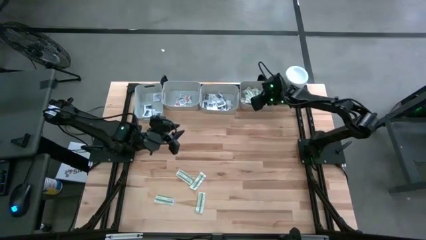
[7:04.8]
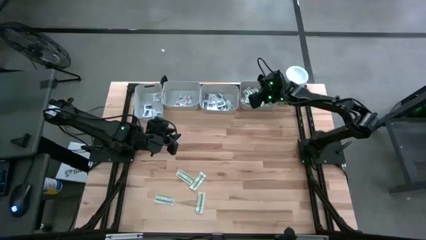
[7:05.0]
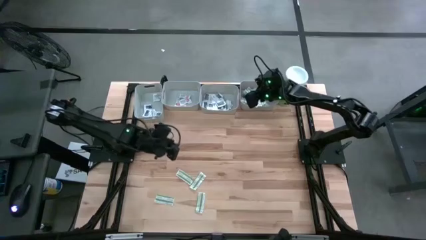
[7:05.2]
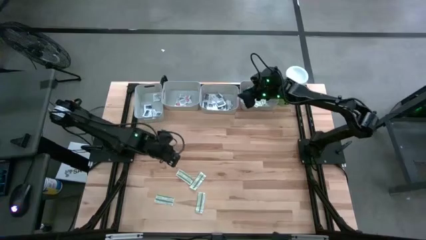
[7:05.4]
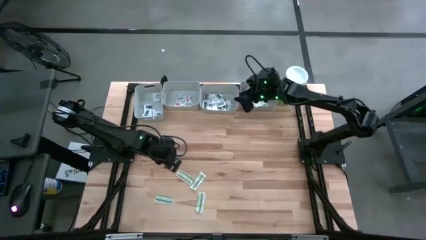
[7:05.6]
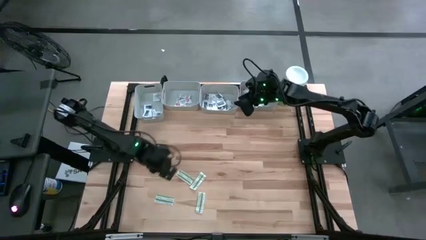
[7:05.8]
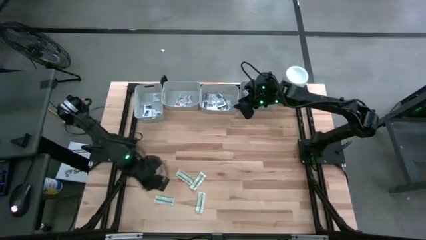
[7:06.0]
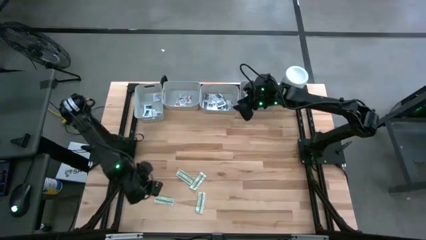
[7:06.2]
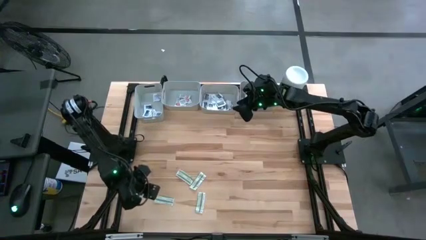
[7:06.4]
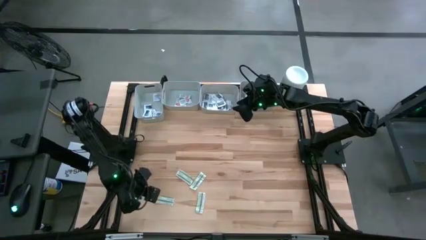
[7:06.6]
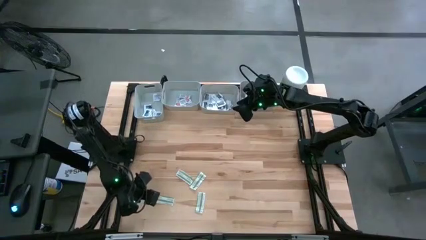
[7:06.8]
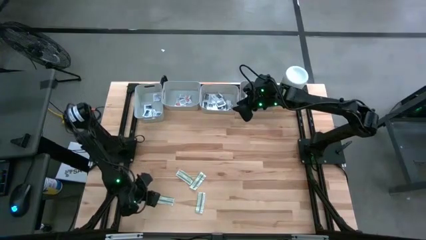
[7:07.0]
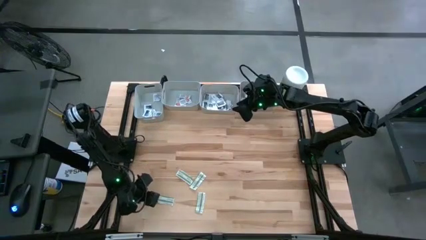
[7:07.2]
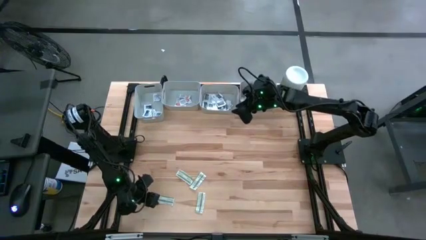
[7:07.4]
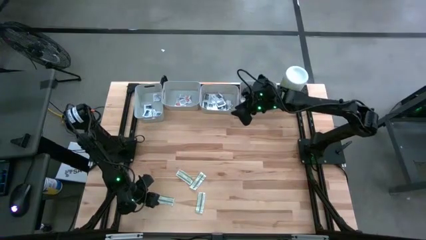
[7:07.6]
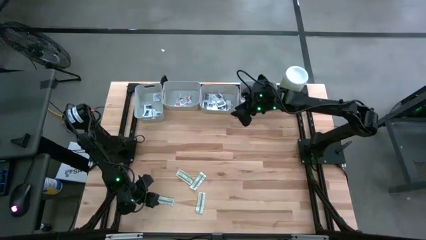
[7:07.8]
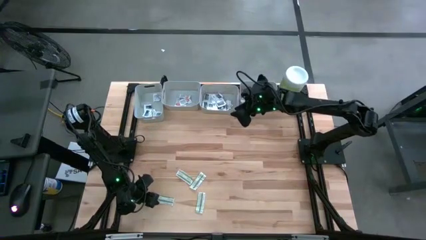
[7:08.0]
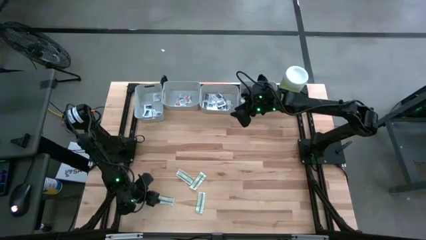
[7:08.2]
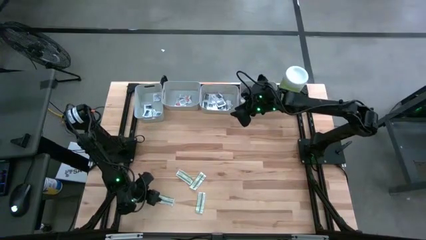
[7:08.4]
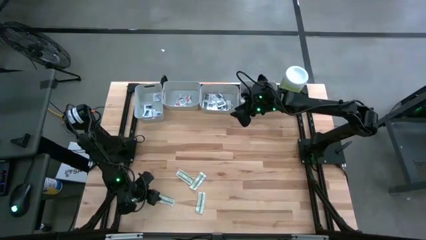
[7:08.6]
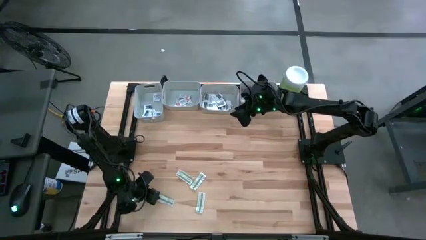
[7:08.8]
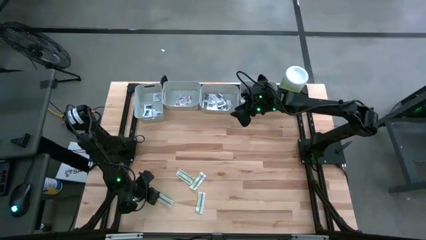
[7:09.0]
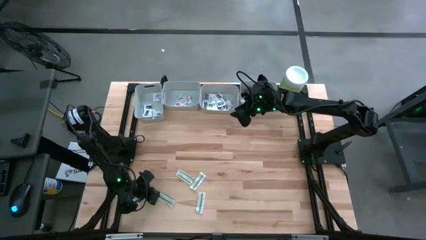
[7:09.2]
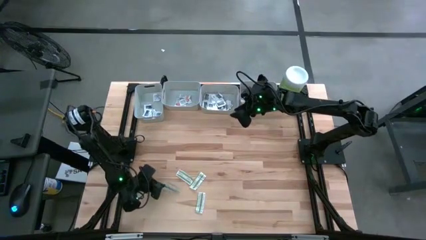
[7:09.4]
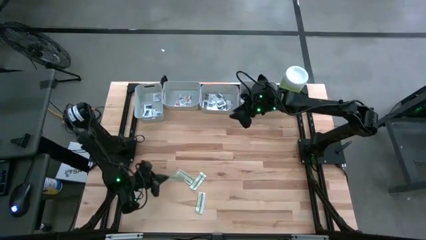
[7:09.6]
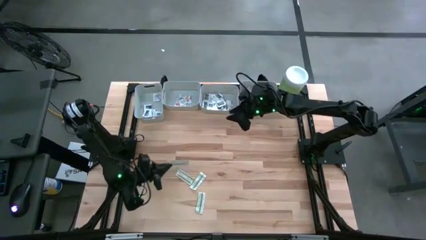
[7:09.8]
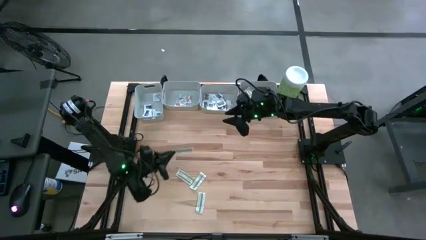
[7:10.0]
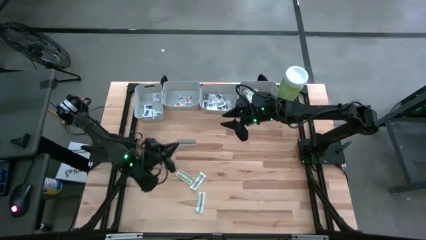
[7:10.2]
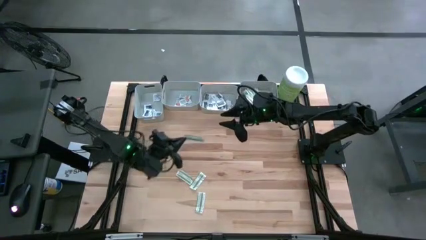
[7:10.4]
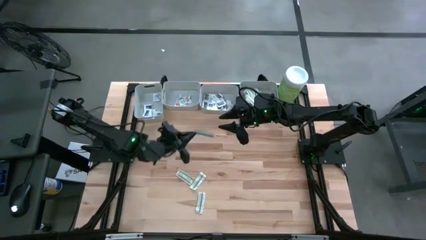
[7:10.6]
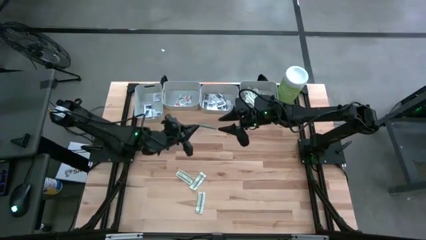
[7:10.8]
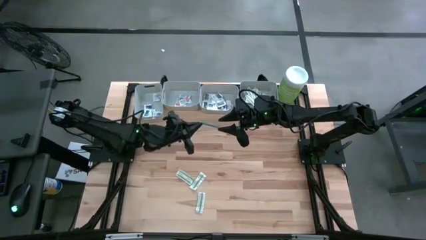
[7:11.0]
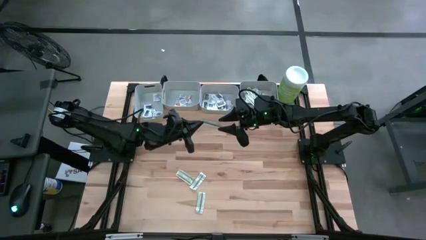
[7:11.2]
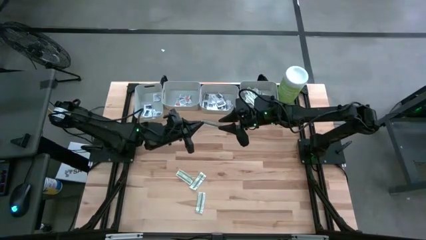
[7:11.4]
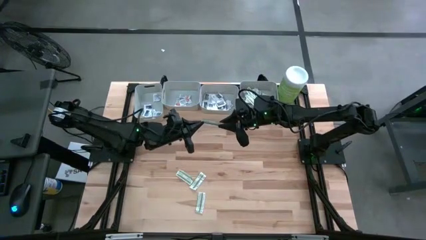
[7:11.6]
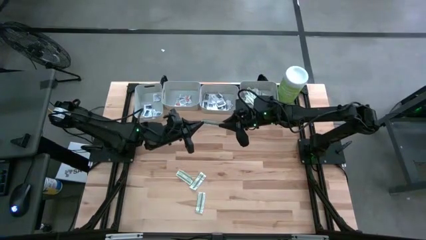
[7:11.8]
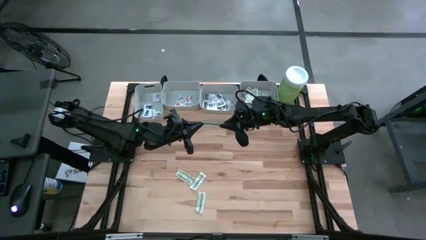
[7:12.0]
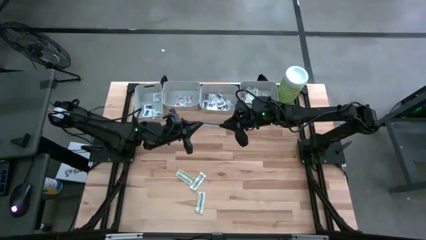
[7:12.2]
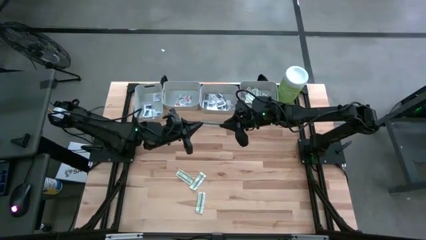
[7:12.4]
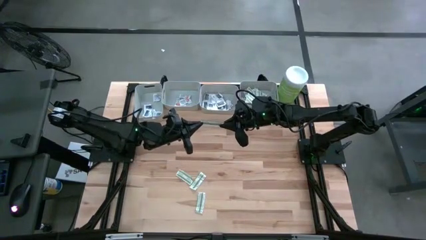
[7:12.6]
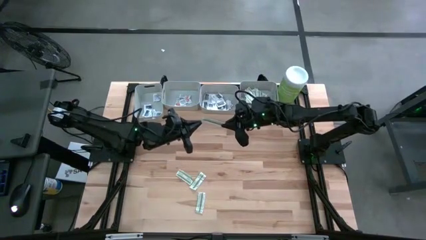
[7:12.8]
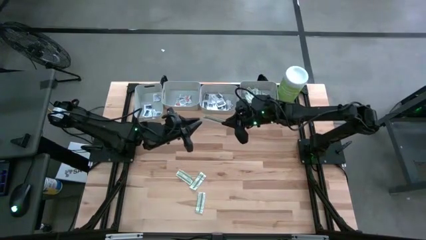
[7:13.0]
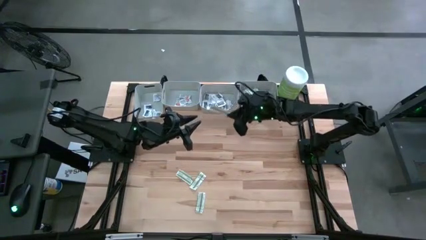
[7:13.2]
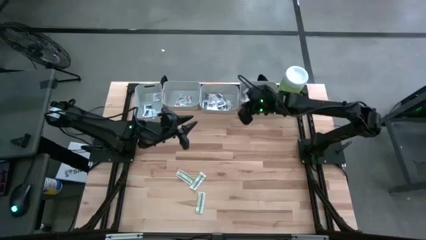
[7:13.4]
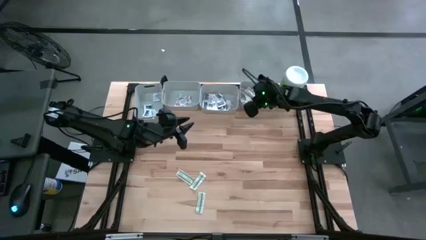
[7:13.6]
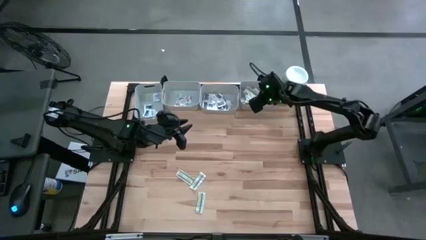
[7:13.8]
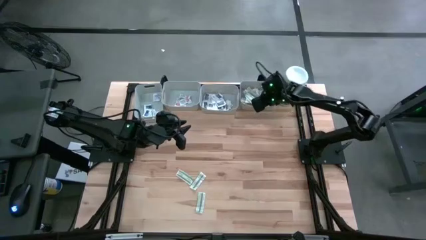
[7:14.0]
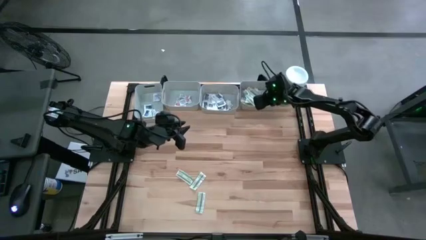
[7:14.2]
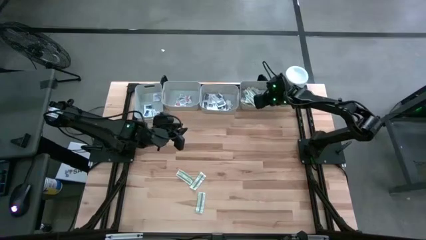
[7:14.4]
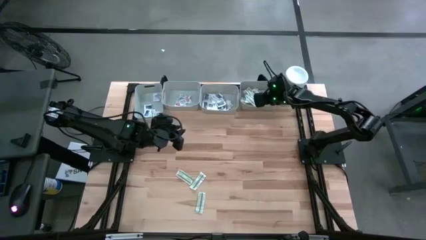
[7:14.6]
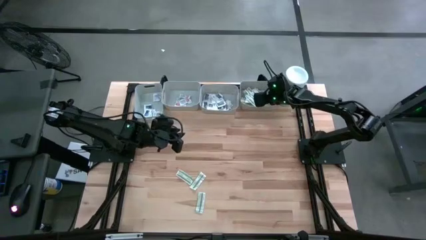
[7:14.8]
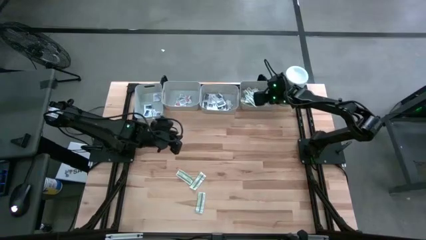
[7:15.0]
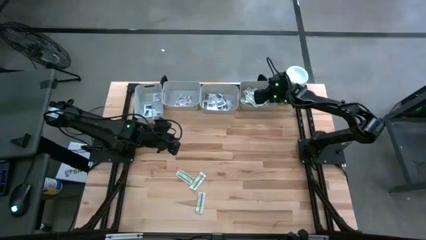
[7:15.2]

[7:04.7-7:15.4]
Task: Pick & Place First Aid Supplies
Put the green bandage into the right gray bin

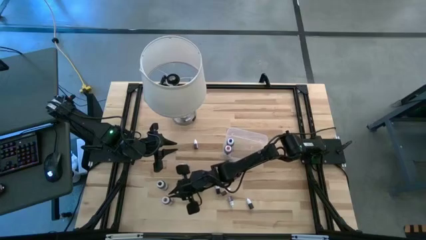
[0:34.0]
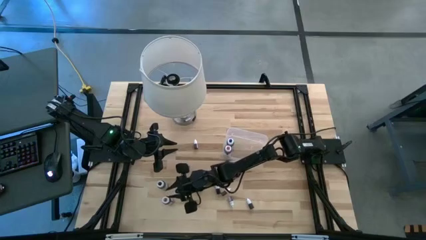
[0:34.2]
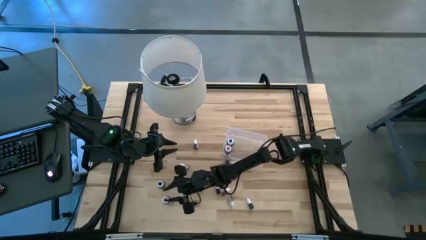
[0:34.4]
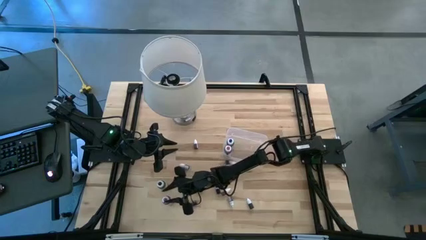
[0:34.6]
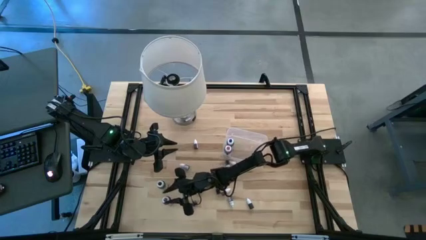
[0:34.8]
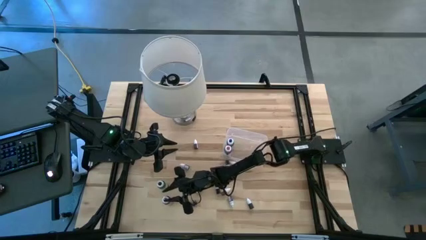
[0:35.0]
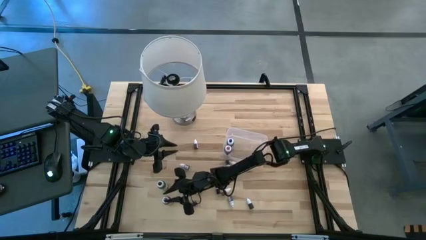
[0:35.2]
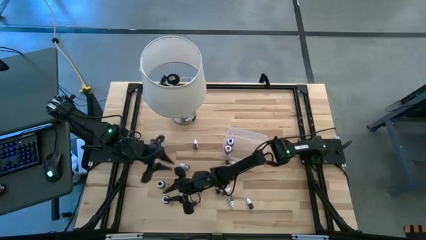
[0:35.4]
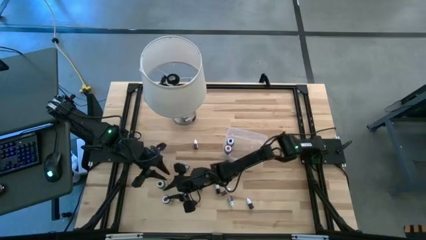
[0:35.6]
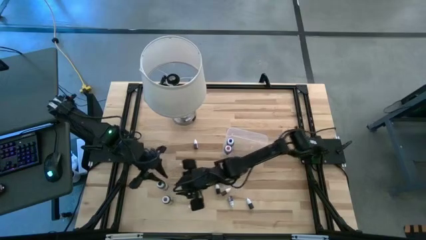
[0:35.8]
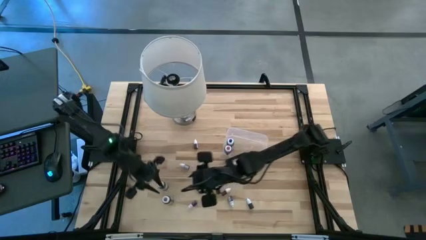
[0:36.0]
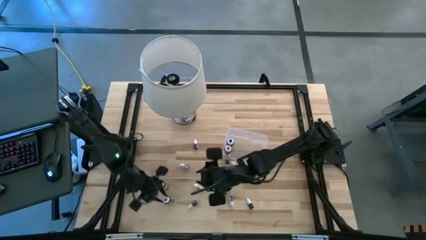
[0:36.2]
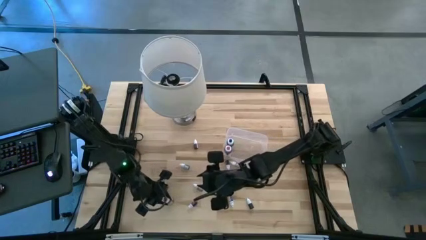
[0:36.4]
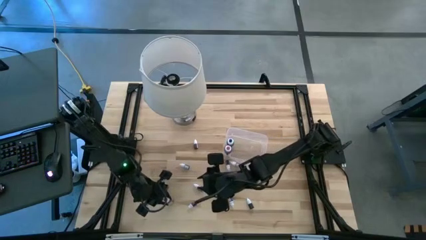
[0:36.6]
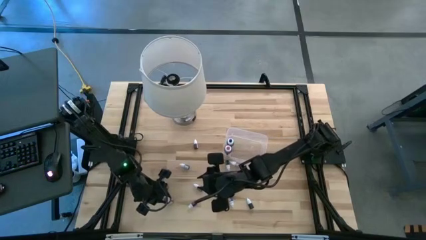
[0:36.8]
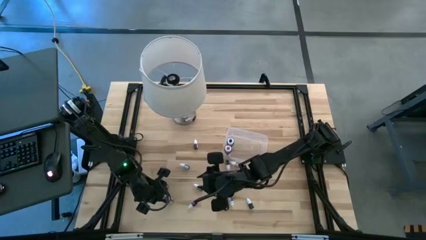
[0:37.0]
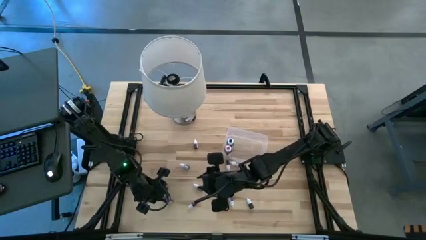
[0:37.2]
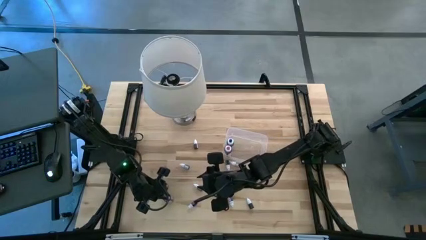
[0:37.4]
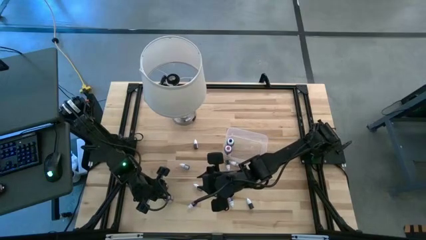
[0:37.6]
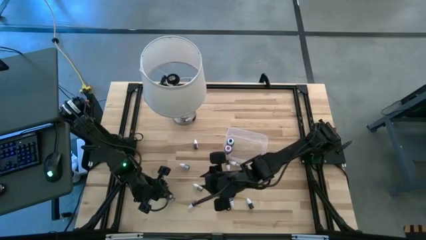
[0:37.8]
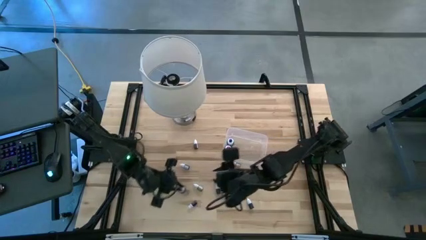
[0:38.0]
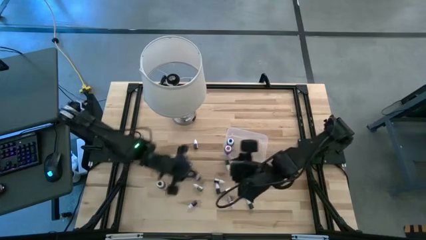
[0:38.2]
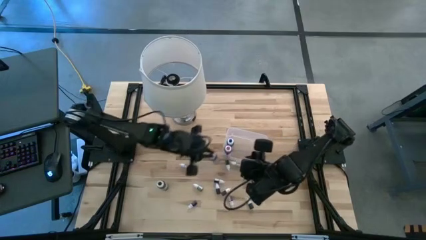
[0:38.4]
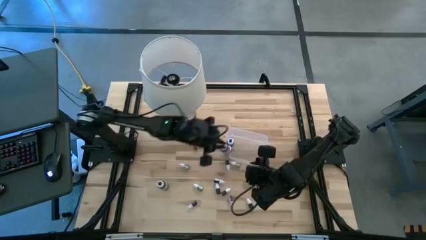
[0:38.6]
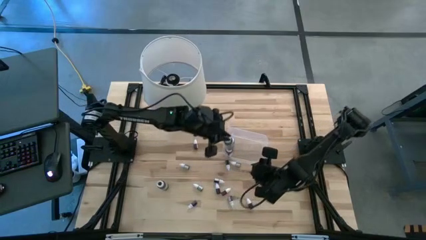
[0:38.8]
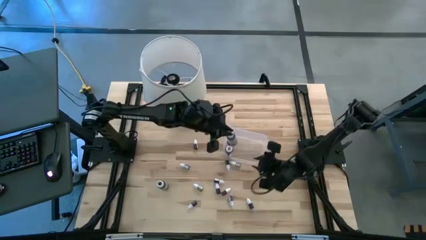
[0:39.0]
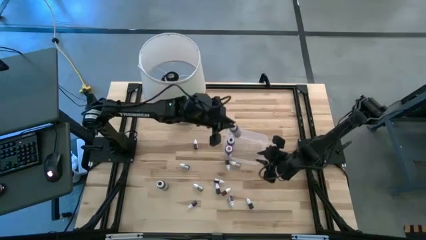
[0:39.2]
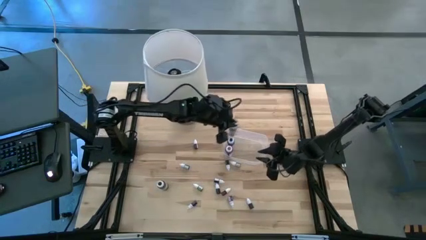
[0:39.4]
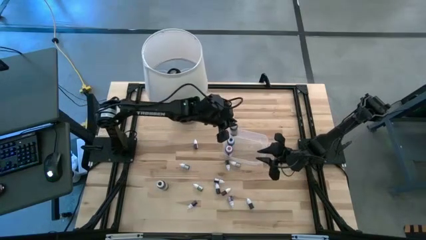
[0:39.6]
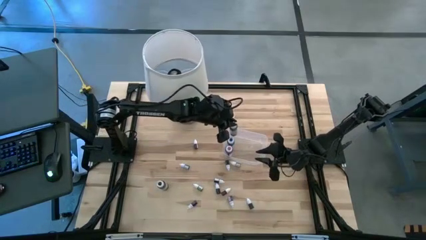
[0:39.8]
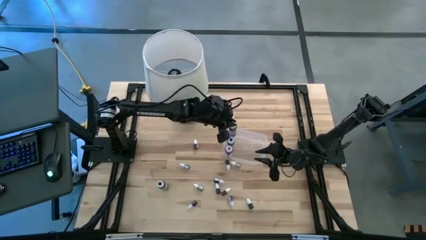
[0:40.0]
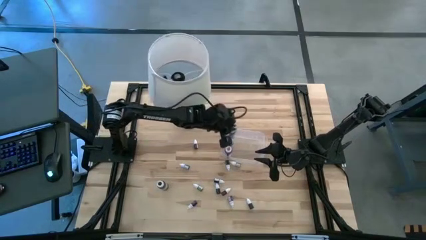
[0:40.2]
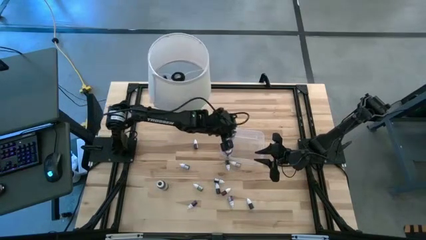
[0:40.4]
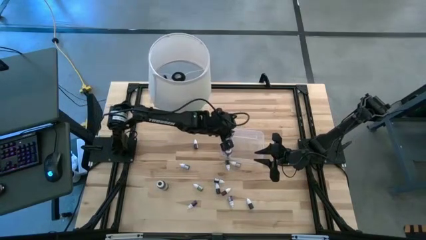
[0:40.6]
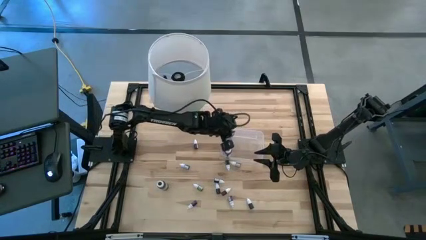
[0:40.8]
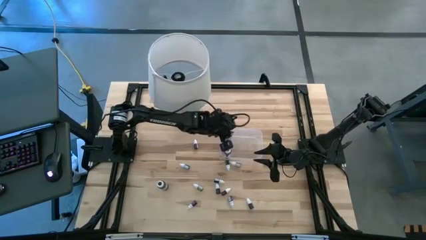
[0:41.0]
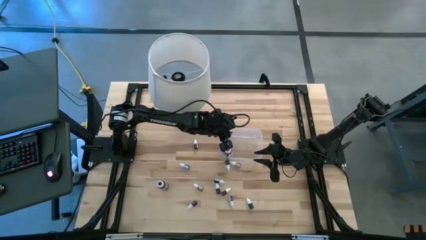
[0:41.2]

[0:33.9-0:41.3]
Task: Pick & Place food coloring
Put the large purple food coloring bottle into the transparent bin
